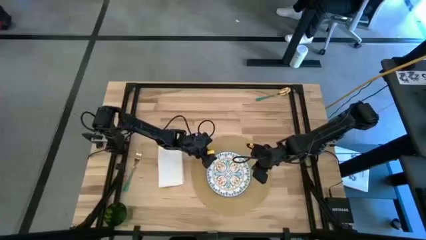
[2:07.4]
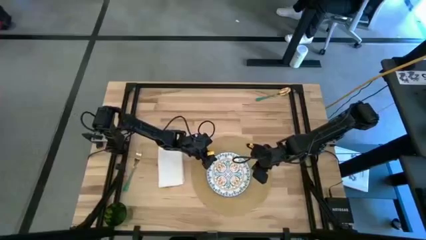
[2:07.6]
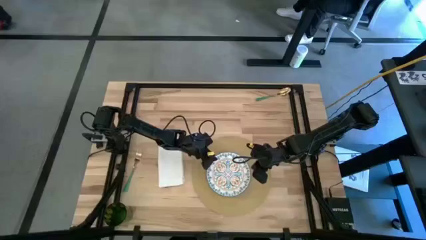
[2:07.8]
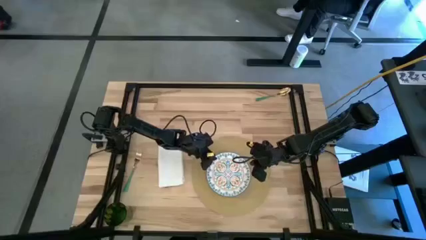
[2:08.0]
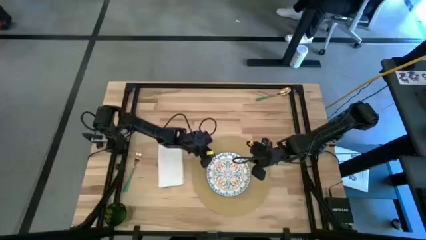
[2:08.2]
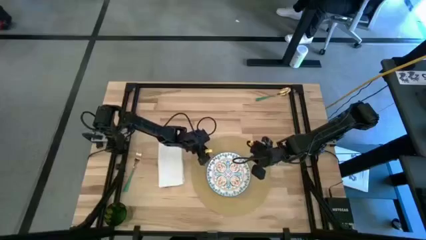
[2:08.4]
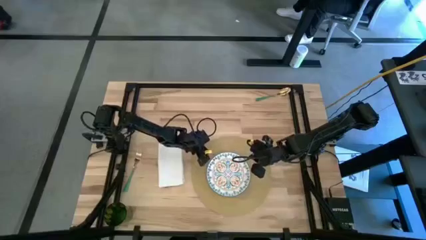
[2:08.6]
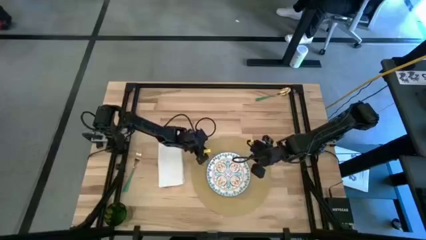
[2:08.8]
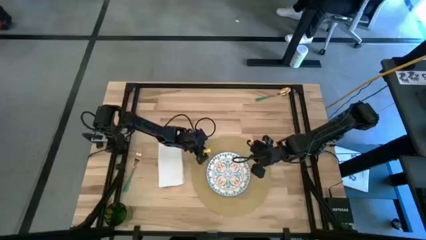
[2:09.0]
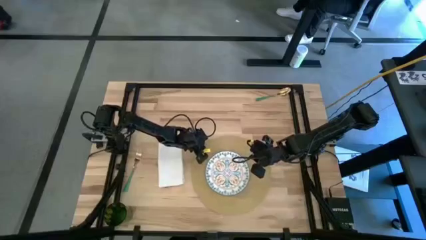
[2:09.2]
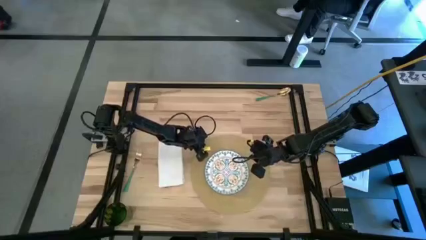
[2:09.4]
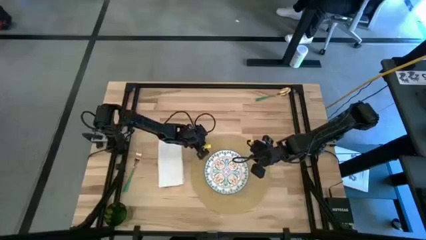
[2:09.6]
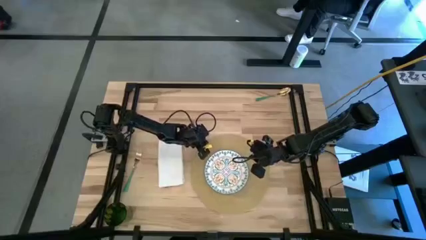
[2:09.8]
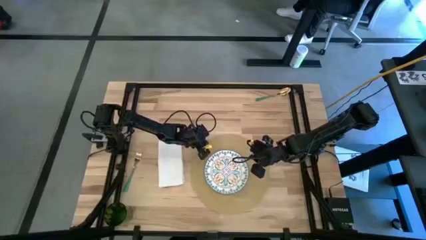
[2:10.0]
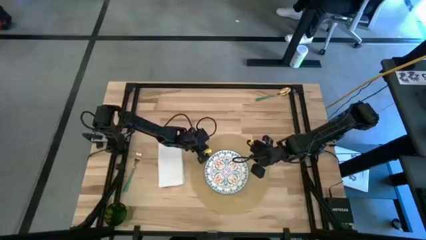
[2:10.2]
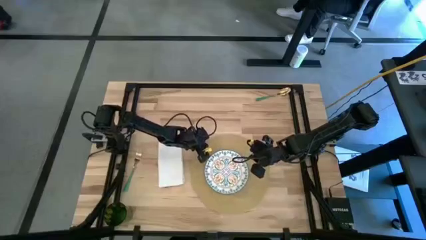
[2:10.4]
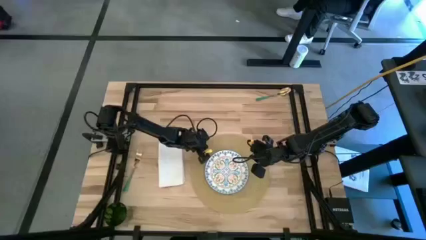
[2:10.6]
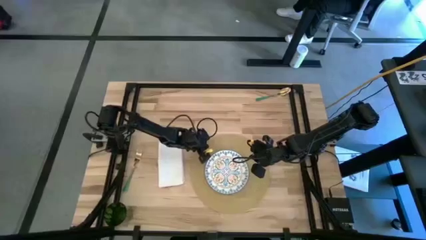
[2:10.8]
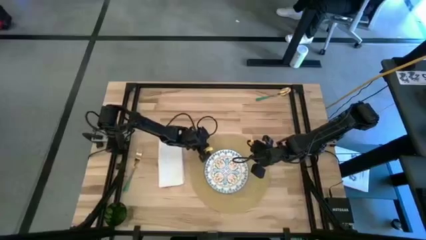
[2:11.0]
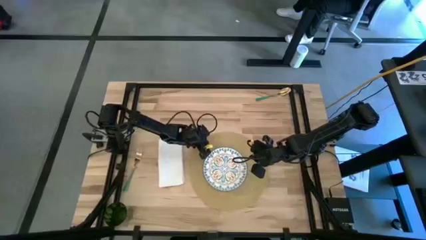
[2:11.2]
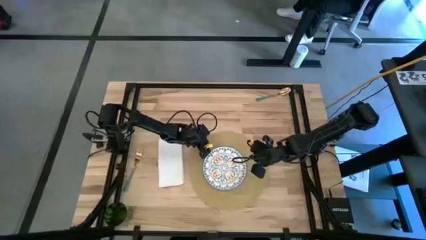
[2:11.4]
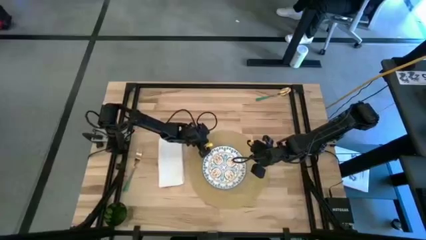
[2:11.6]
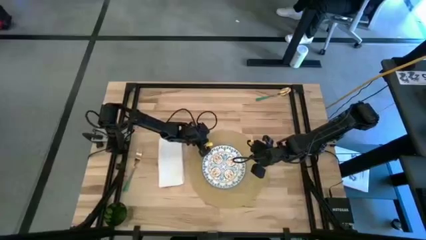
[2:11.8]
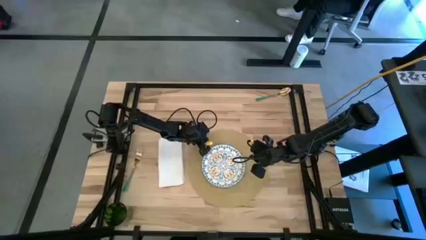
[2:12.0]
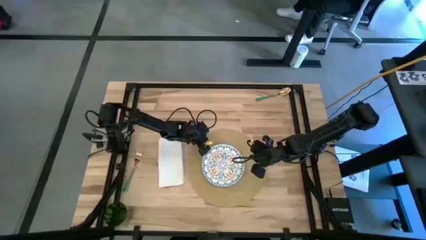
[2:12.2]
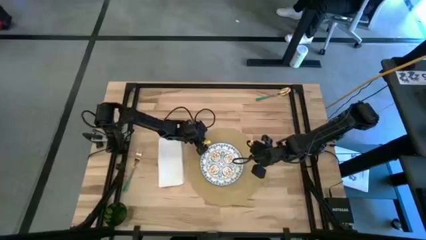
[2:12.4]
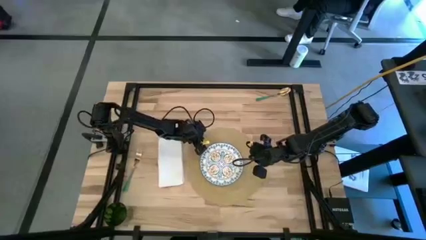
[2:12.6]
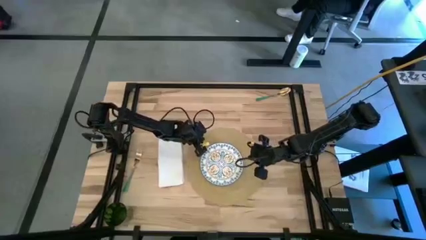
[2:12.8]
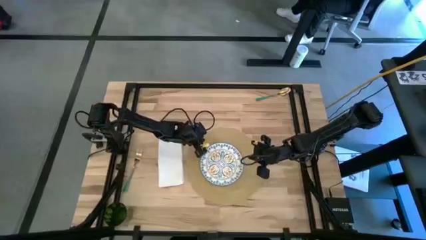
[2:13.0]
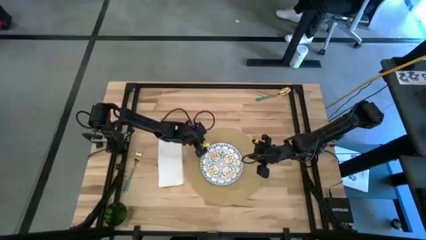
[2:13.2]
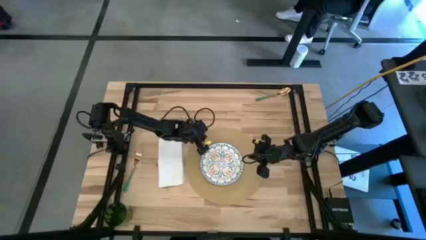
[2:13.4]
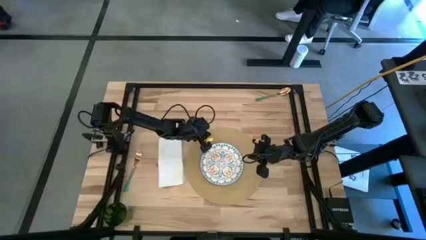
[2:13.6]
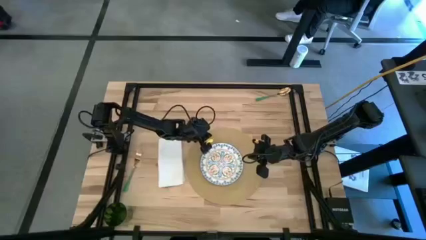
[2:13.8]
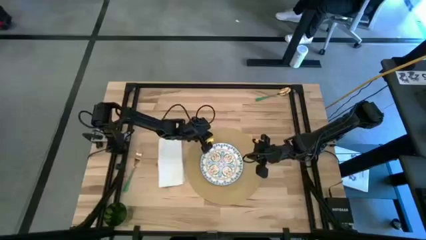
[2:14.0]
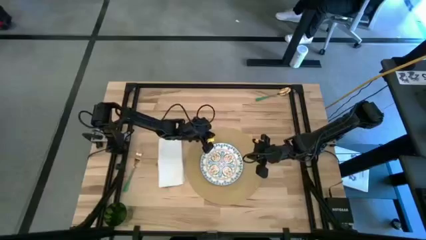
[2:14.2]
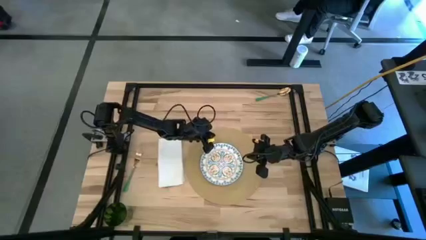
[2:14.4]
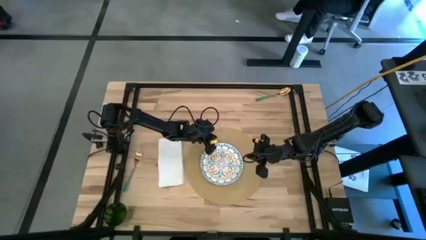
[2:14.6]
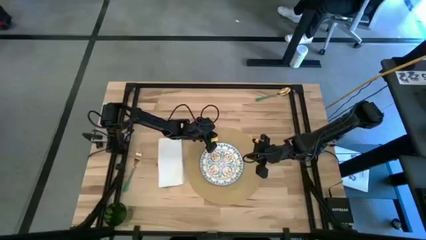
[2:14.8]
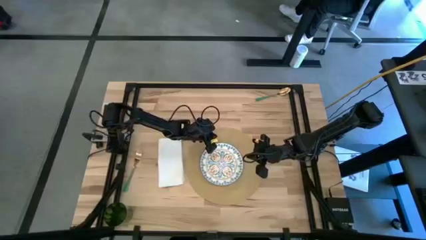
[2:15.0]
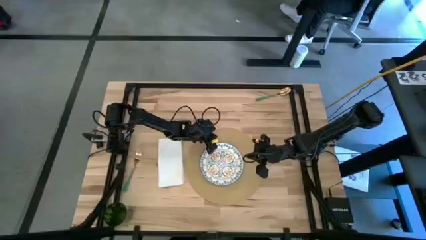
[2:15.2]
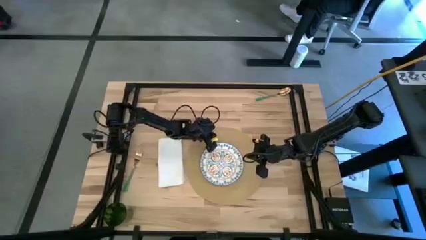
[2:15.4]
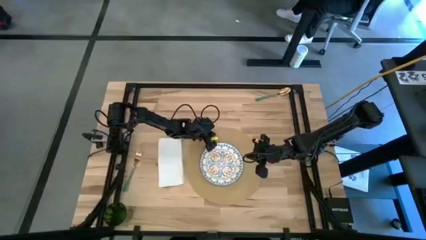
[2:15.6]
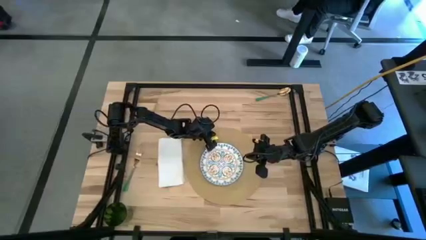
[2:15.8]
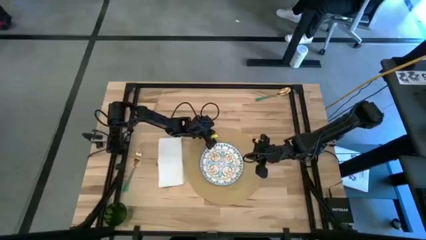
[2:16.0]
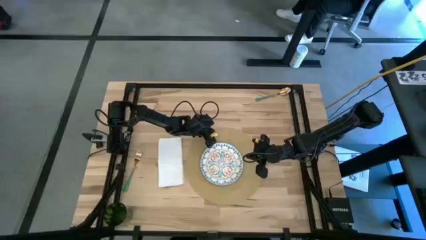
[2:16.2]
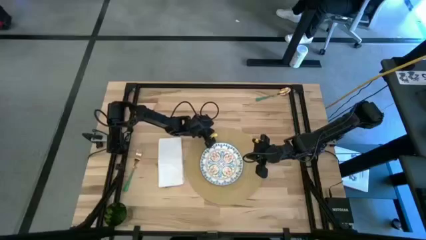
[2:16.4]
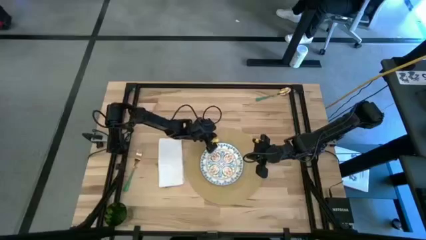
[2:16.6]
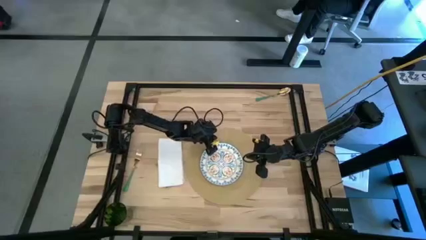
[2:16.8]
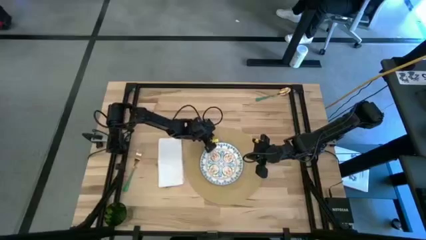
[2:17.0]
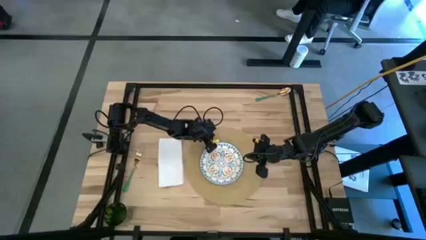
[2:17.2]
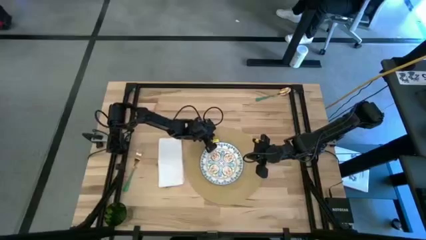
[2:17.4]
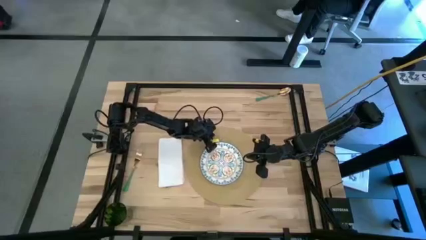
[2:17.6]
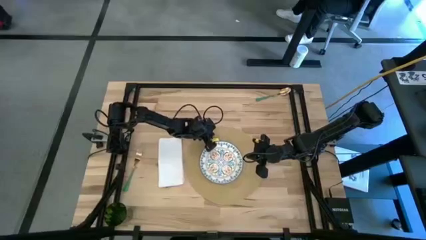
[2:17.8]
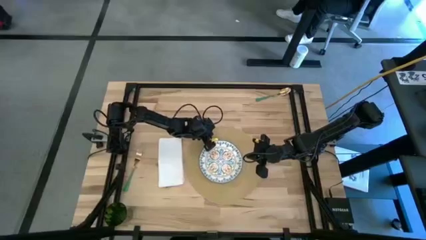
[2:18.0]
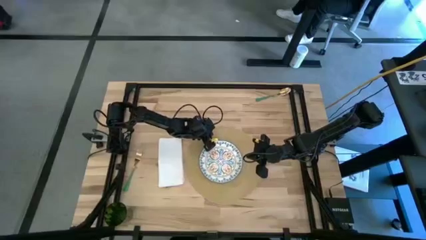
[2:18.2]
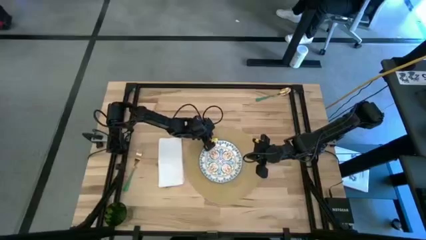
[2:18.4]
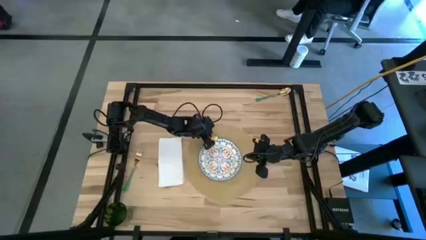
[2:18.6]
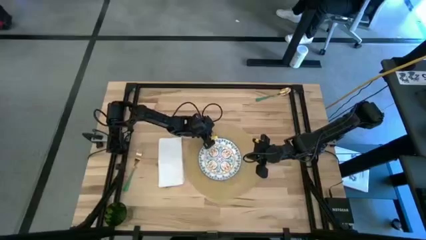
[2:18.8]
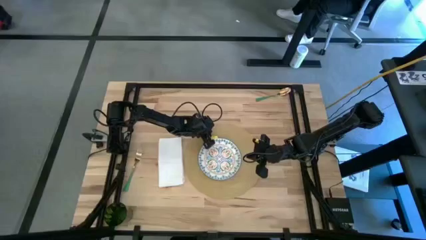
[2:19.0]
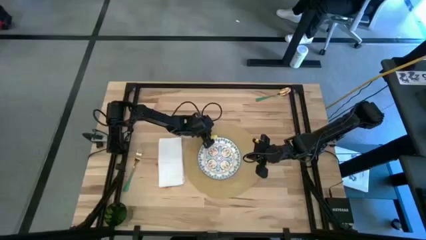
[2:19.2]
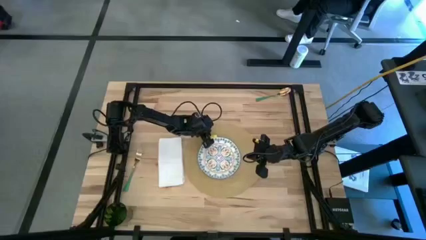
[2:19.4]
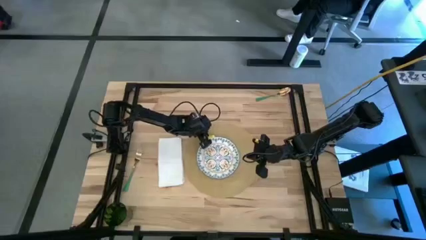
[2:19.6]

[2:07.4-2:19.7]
Task: Set table place
Adjust the brown placemat

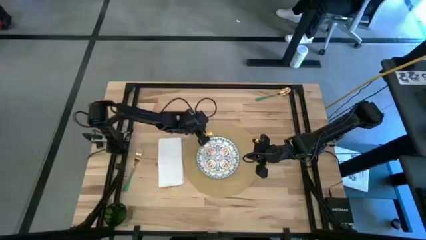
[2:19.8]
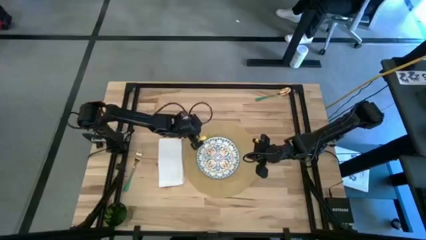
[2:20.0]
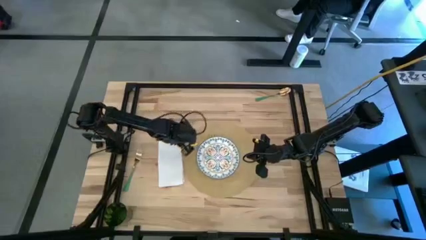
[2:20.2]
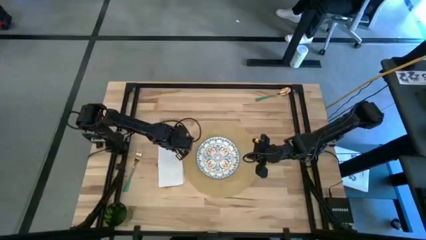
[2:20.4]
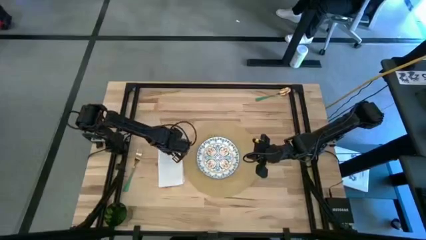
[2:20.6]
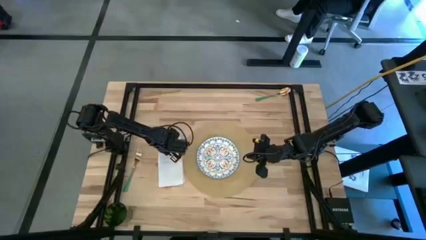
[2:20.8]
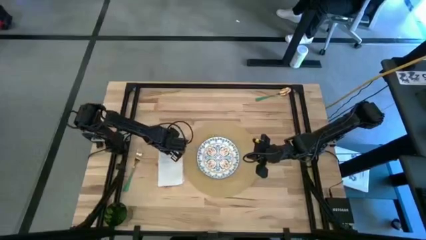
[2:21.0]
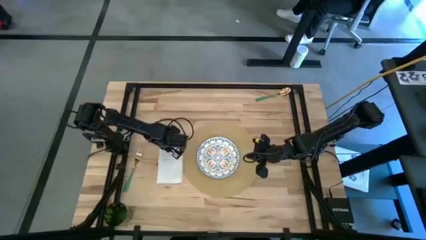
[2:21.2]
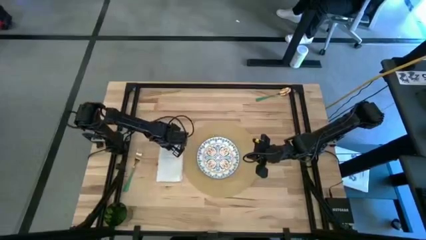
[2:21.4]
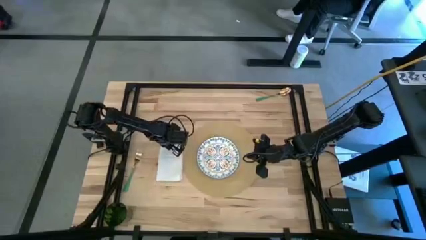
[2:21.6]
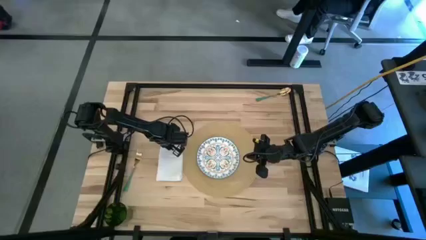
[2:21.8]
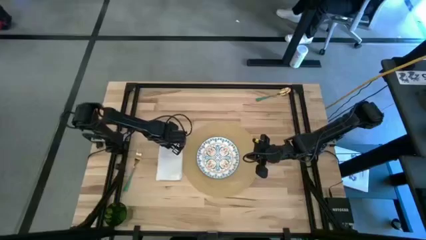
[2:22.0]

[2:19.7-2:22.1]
Adjust the white table napkin
